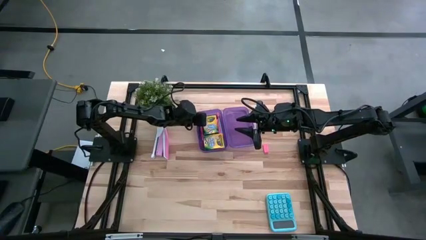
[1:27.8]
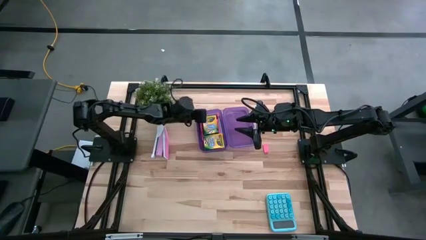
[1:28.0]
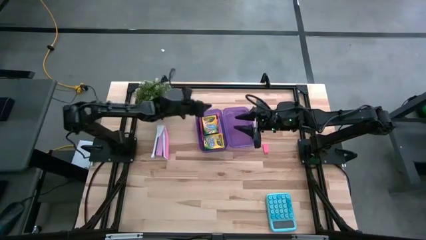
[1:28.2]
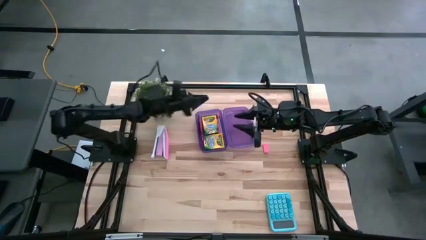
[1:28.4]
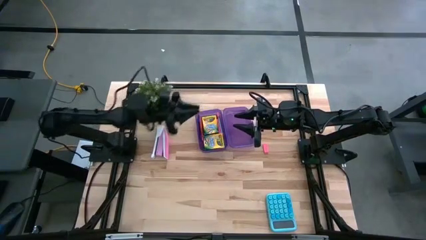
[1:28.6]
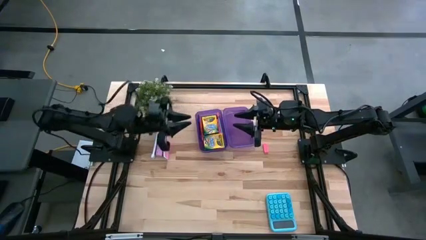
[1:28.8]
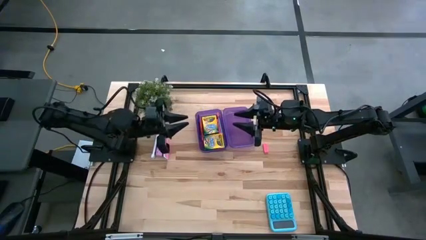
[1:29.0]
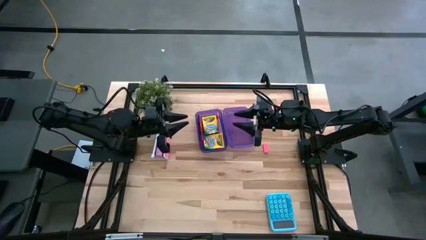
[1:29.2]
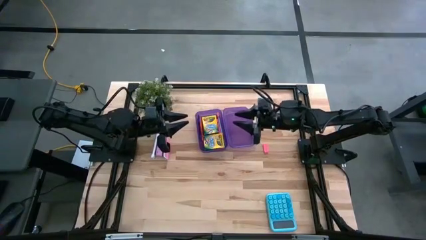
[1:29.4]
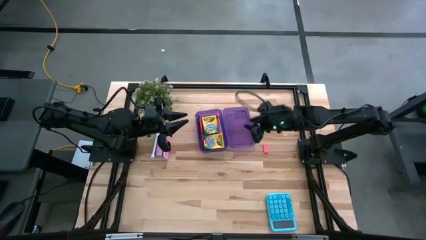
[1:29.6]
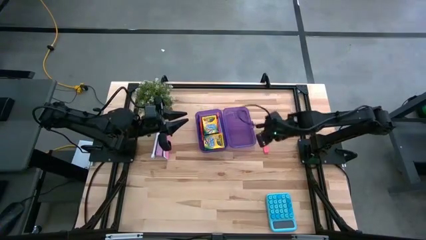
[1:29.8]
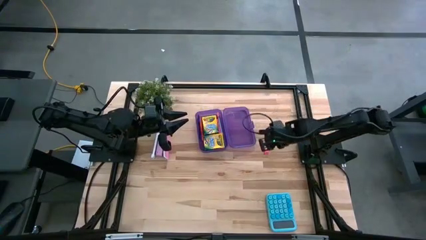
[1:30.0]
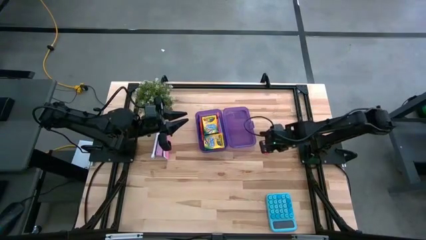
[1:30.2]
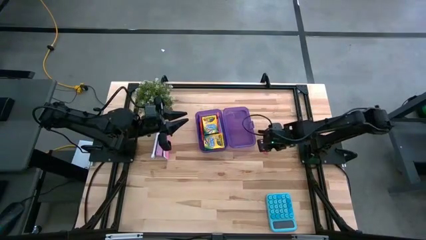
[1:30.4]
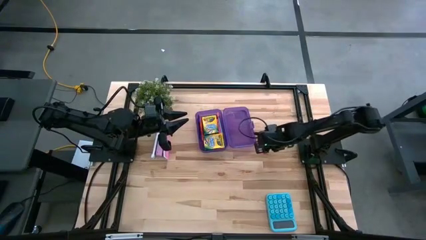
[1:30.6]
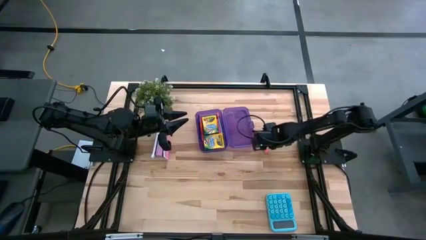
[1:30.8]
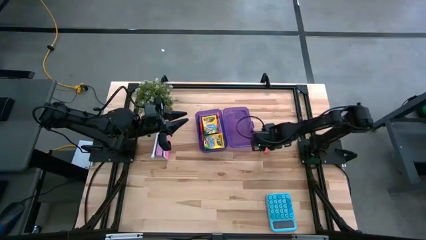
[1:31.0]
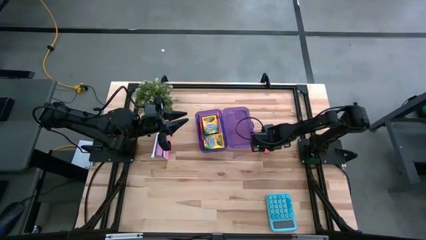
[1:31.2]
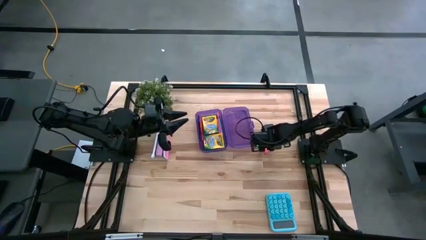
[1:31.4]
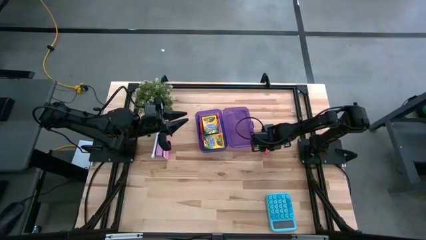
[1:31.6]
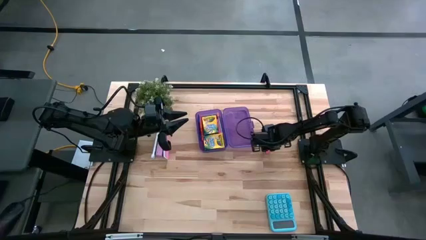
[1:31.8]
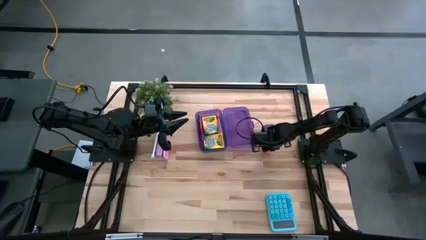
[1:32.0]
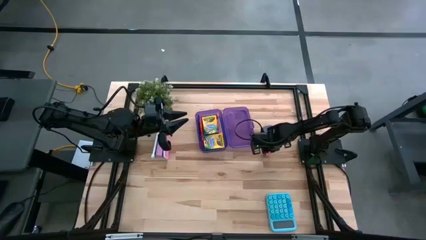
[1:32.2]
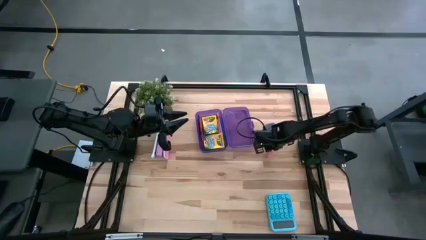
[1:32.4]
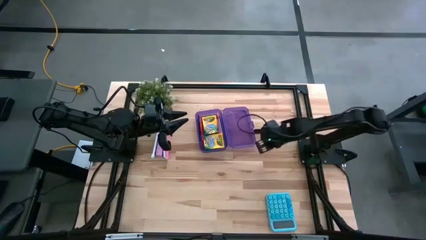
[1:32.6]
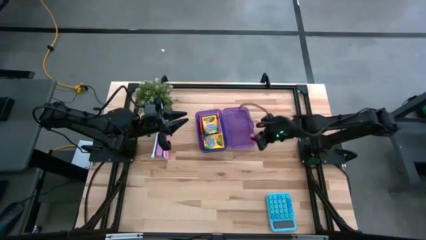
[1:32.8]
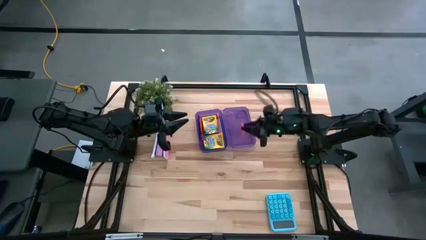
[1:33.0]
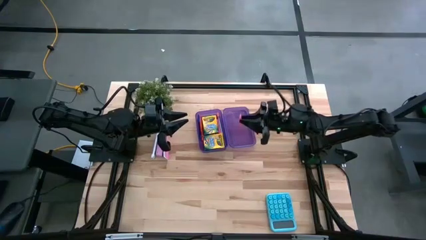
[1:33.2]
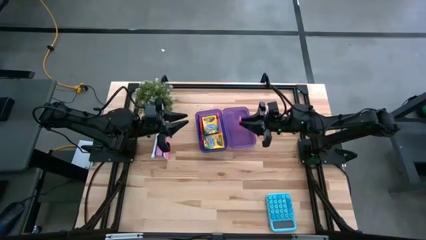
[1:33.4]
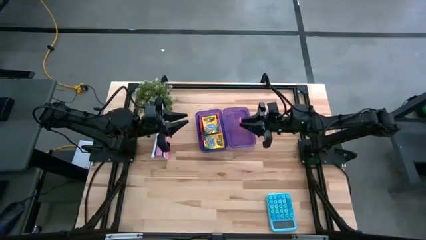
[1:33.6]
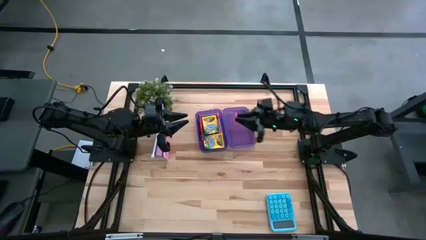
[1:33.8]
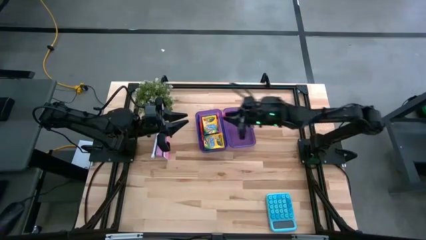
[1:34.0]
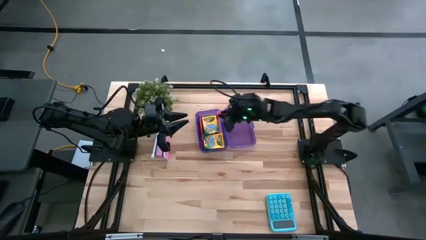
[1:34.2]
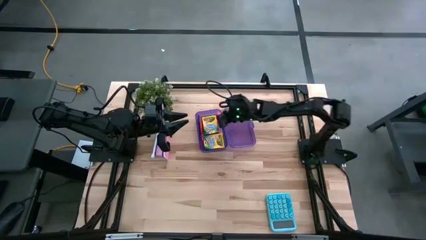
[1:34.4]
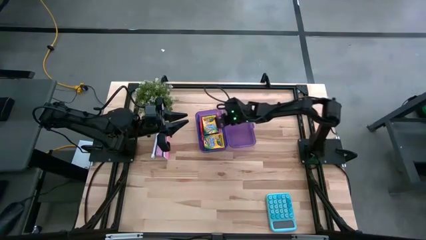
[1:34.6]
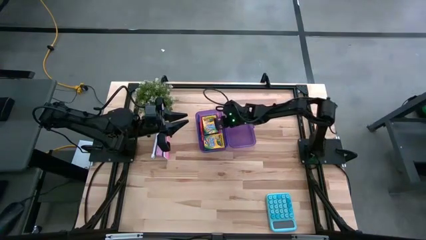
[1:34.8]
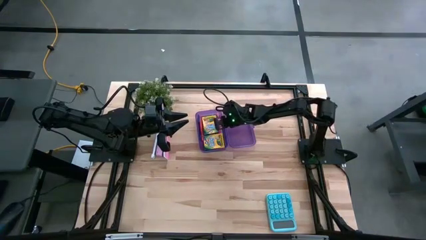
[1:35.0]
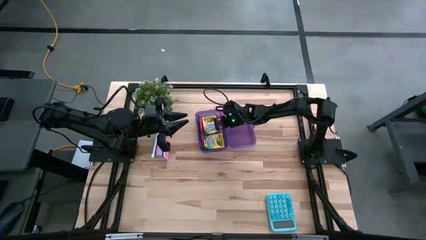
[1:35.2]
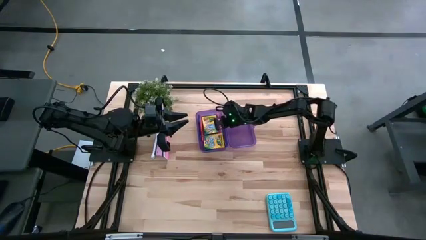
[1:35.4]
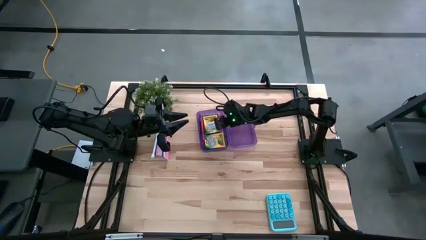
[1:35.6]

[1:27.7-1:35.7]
Task: Pick & place school supplies into a supply box
Put the pink eraser into the purple supply box

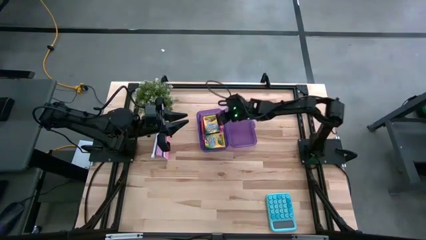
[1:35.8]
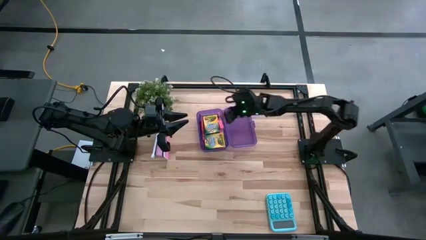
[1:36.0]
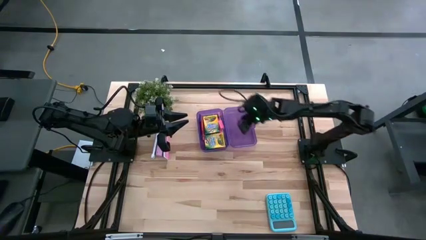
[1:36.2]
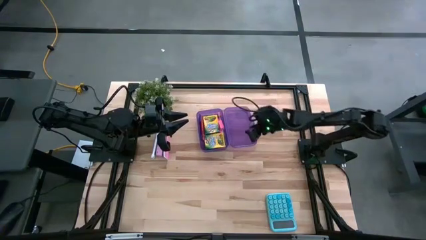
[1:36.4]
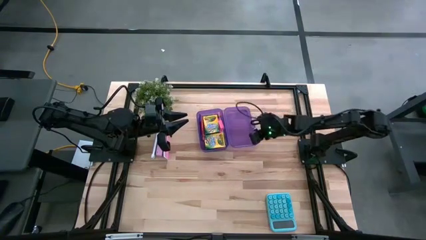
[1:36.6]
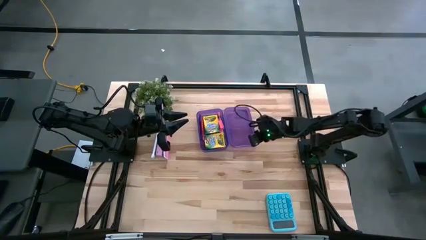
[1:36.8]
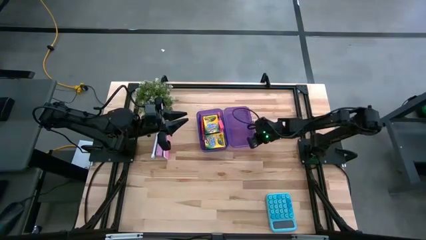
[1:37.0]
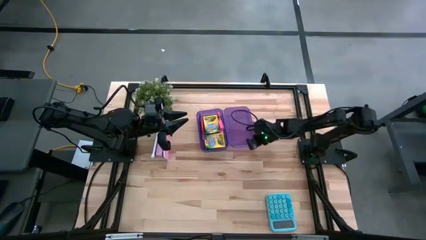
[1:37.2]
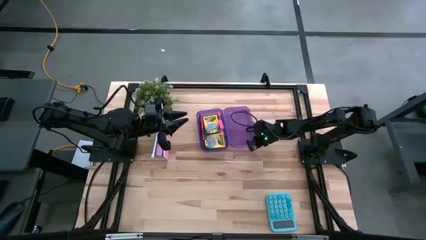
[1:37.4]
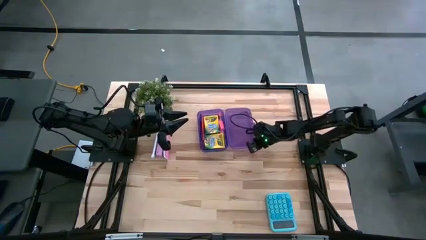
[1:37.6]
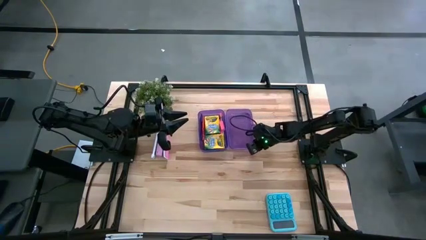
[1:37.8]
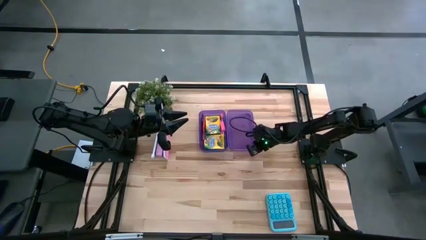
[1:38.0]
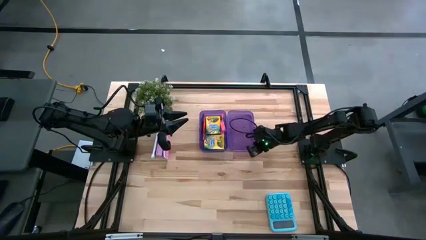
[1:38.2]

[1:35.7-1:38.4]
Adjust the purple supply box

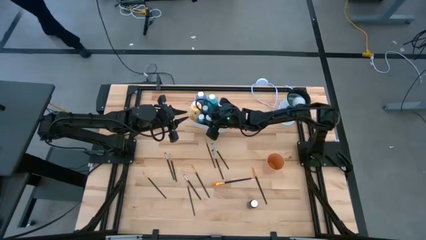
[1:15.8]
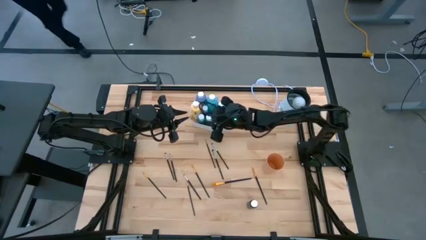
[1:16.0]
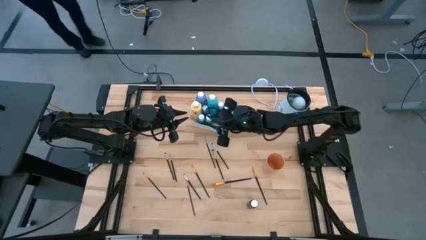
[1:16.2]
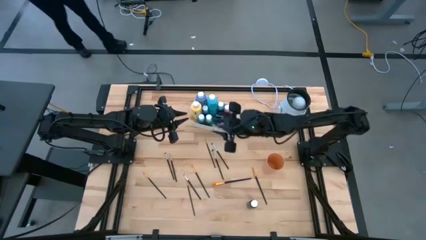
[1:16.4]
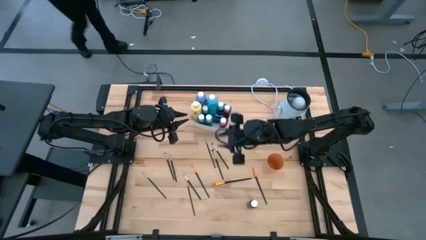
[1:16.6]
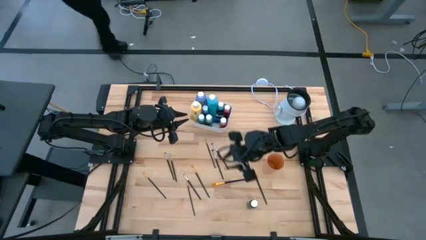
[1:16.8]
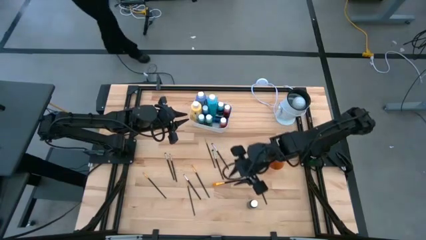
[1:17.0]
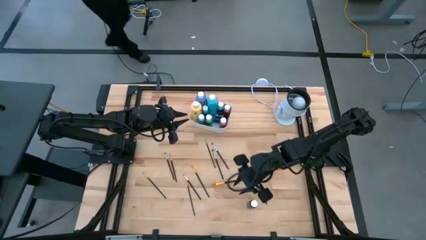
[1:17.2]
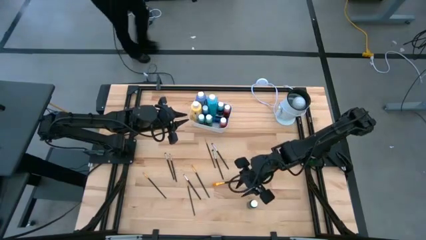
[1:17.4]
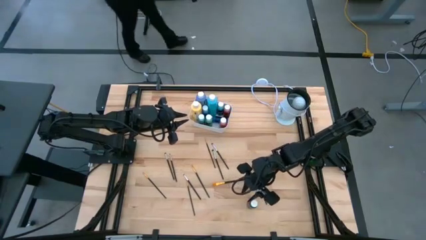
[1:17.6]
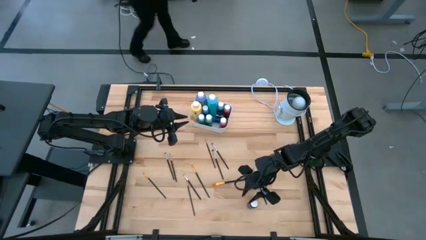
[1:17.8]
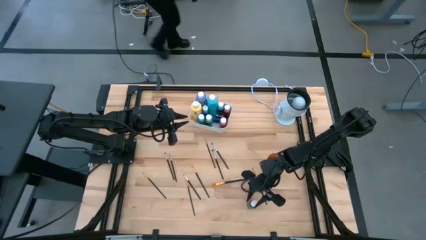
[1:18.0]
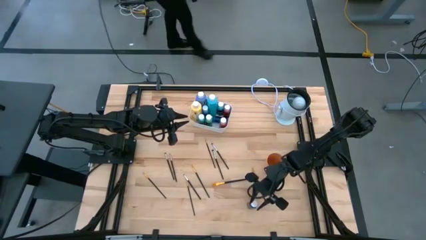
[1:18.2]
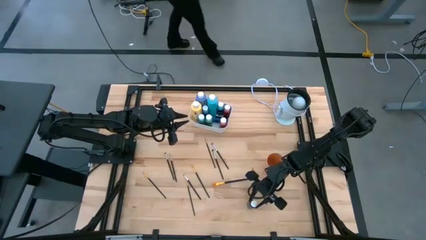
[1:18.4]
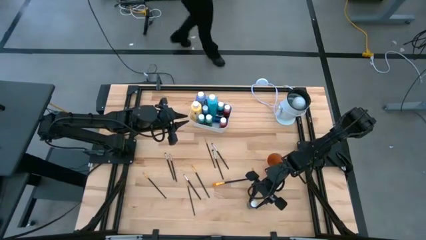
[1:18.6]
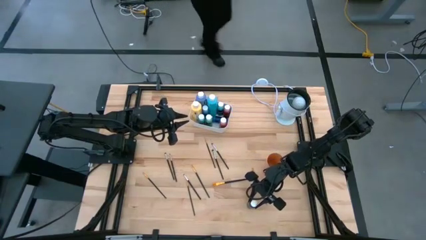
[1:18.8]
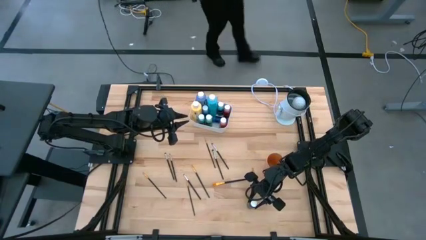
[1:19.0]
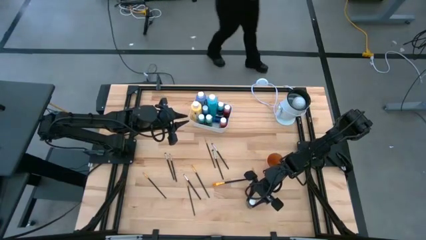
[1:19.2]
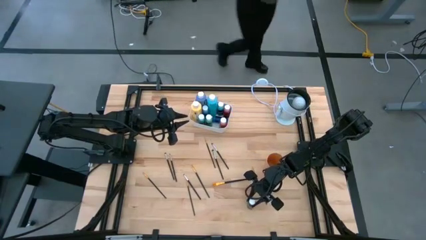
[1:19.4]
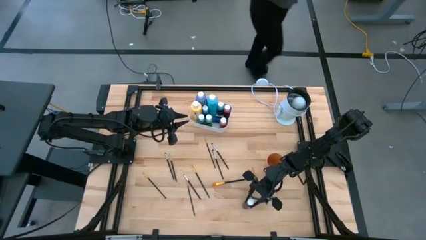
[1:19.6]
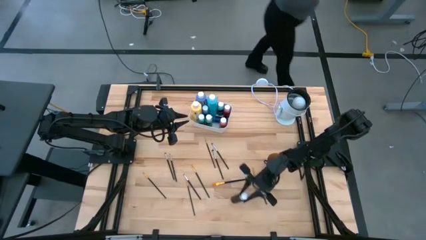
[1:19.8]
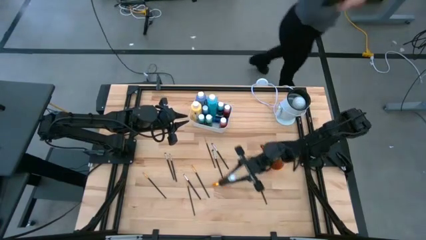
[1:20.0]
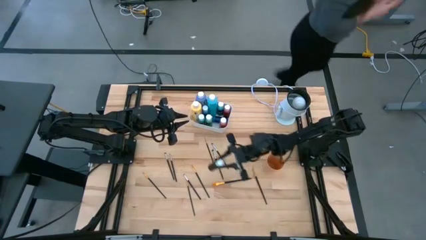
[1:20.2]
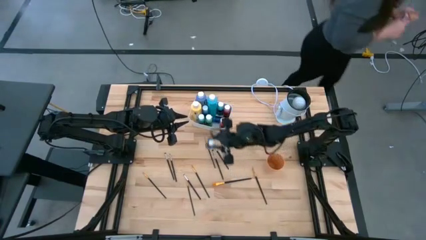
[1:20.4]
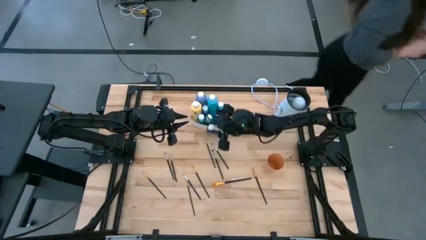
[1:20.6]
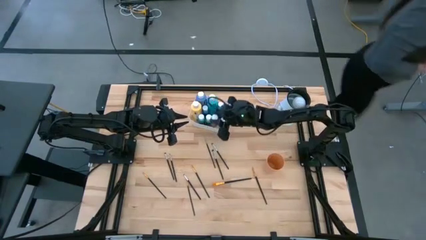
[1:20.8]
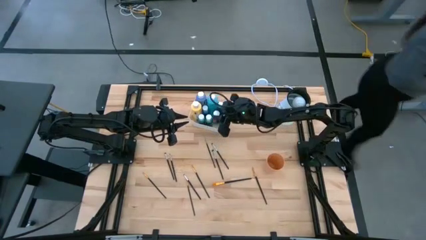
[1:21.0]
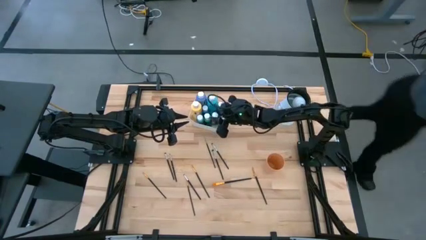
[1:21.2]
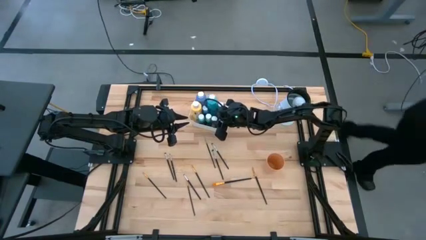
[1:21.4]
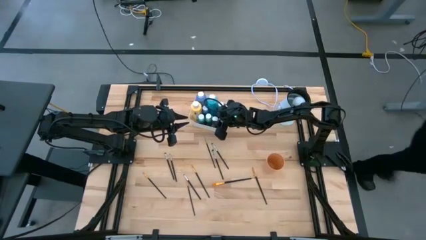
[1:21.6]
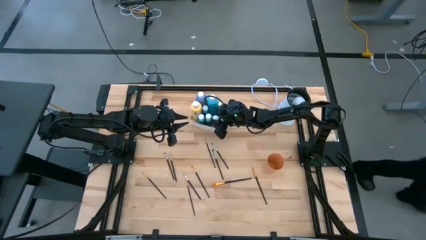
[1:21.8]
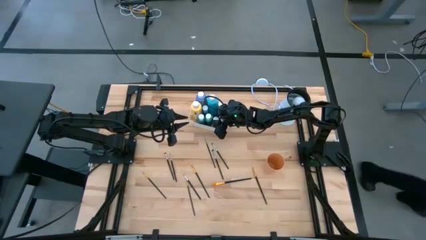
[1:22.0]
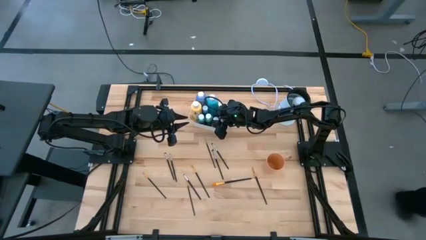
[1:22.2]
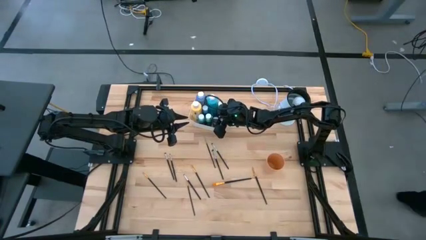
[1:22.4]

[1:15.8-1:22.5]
Task: Pick & Place Paint Supplies
Put the black paint bottle into the white bin
